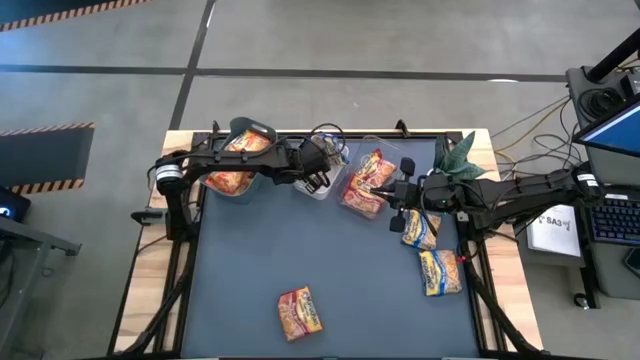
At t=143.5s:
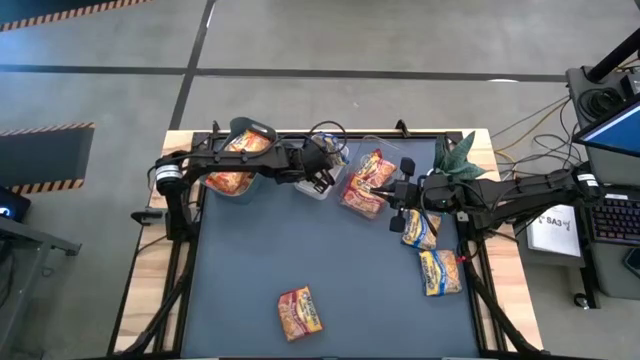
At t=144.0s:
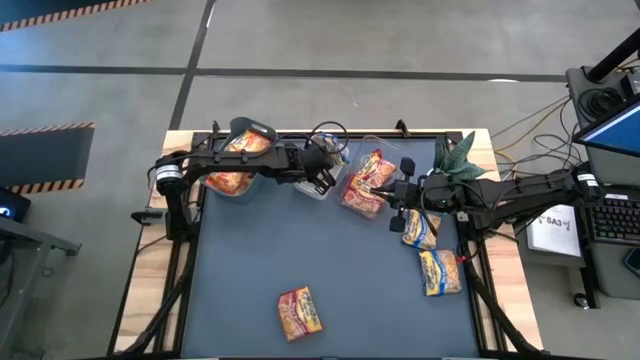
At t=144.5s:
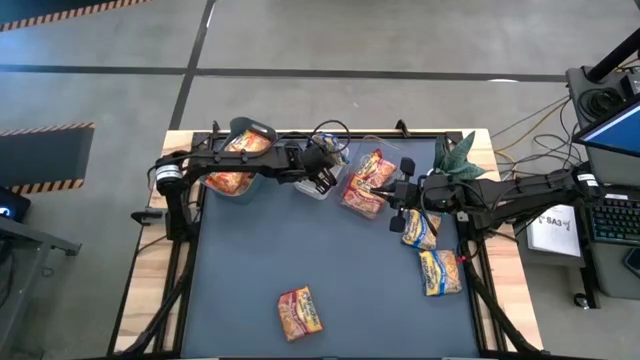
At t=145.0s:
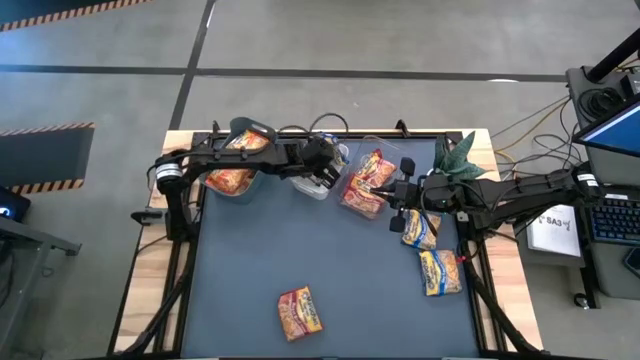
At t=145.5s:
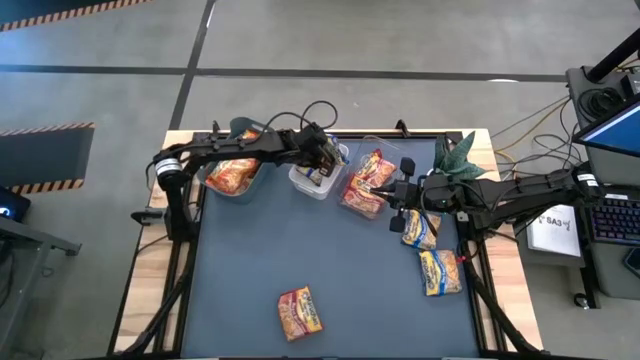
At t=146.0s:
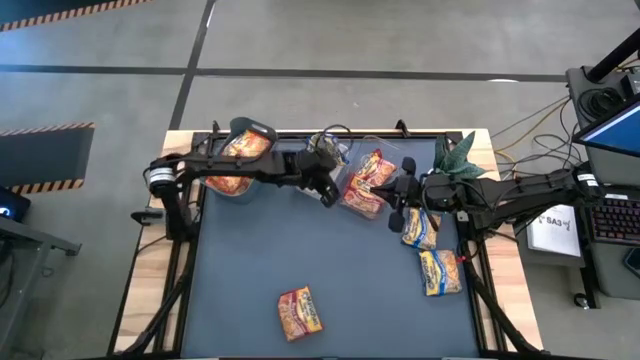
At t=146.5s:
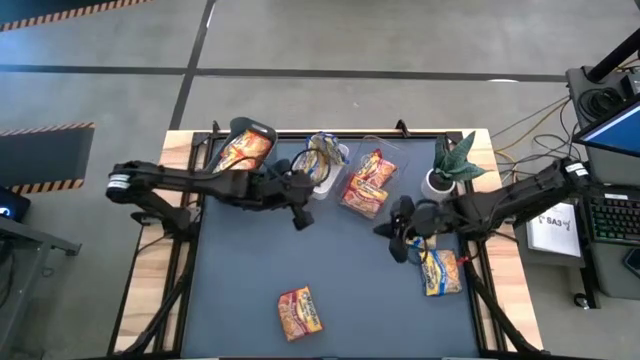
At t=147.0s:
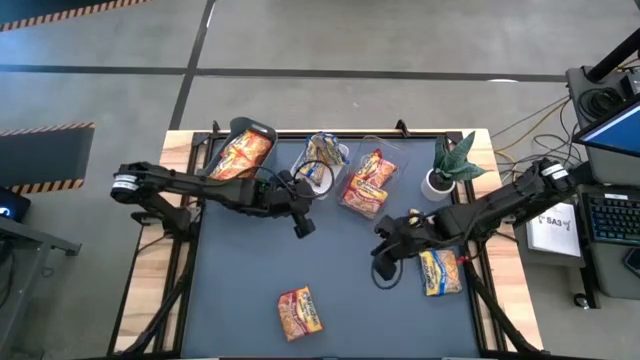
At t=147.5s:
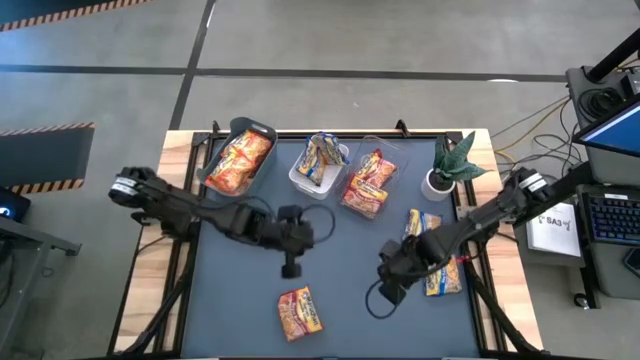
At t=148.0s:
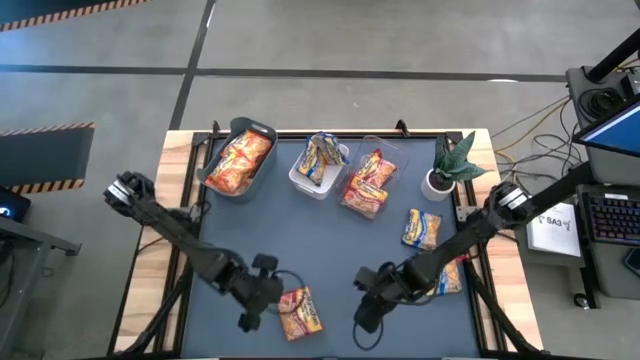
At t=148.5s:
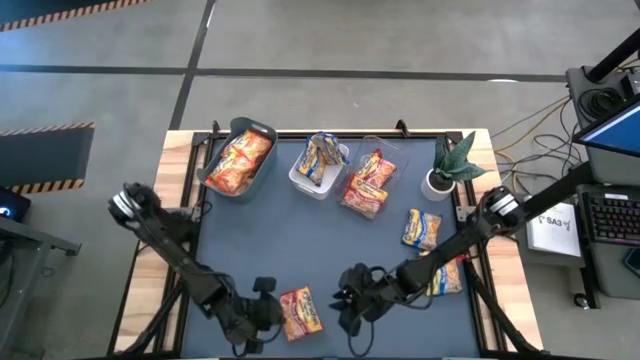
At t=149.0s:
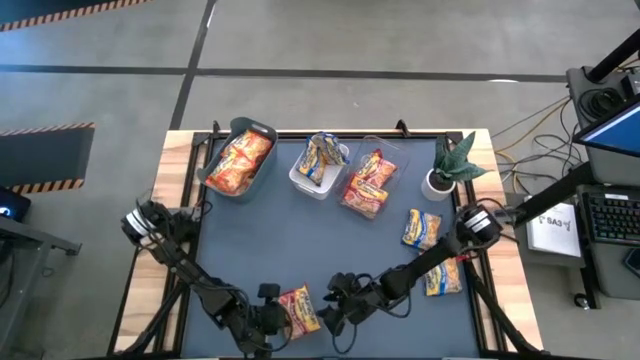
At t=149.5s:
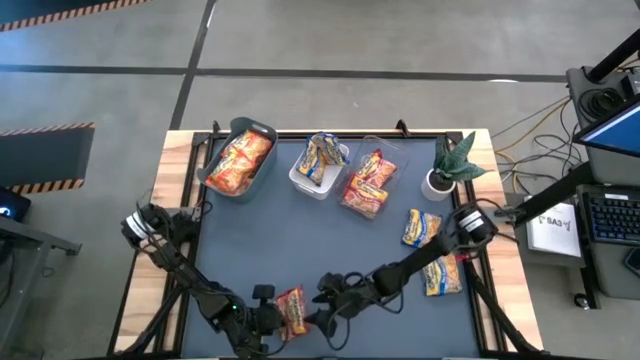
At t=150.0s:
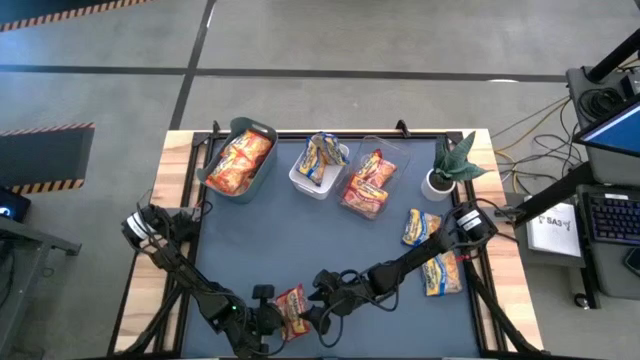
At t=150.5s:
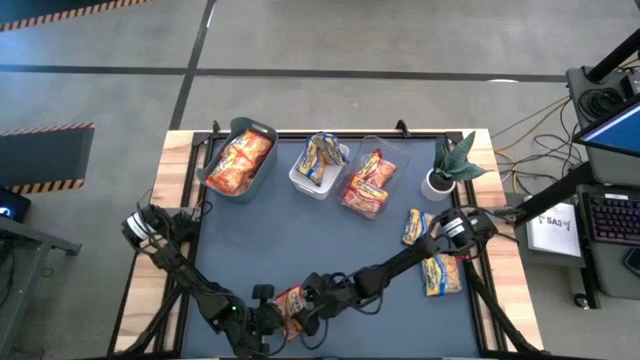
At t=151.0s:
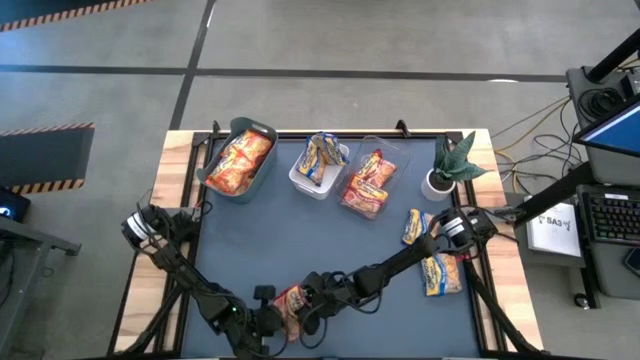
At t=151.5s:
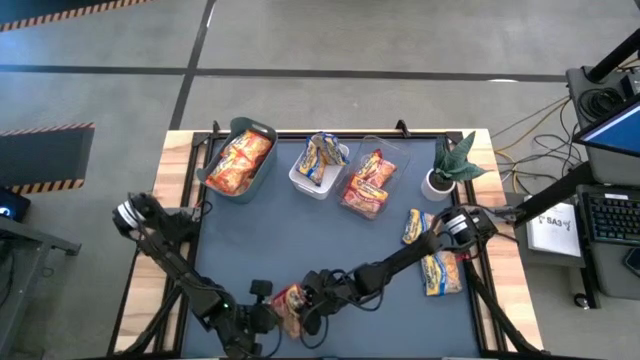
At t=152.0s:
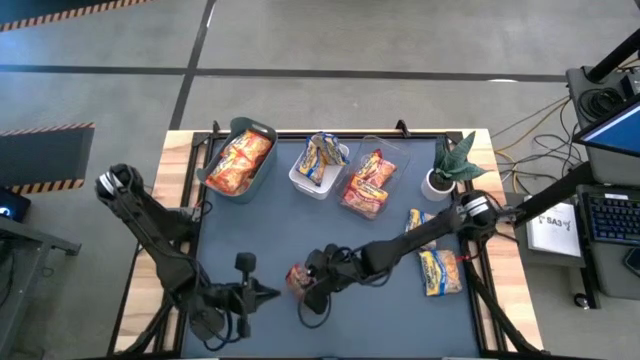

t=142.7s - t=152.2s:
Task: Sort Maruchan noodles
Put the red noodle pack into the transparent bin

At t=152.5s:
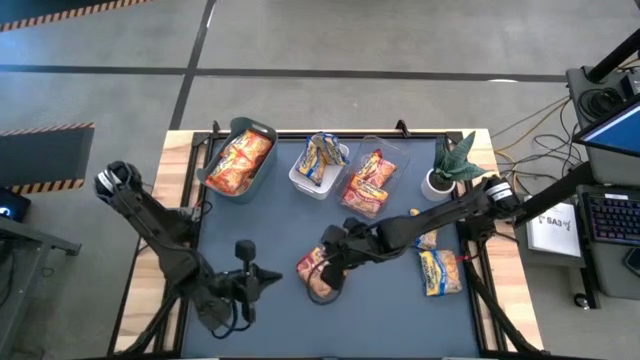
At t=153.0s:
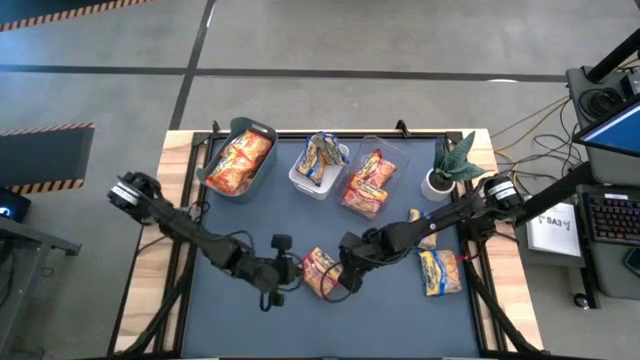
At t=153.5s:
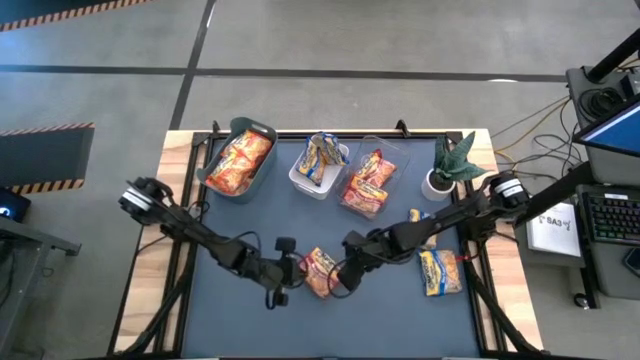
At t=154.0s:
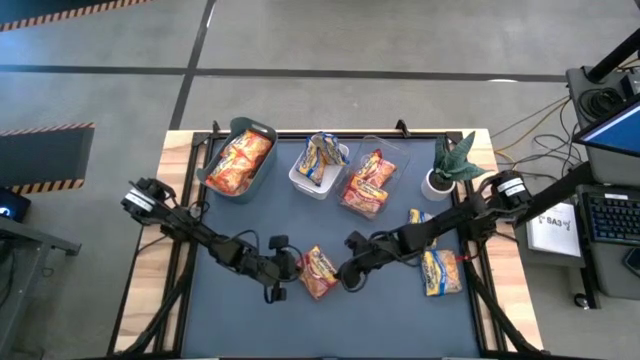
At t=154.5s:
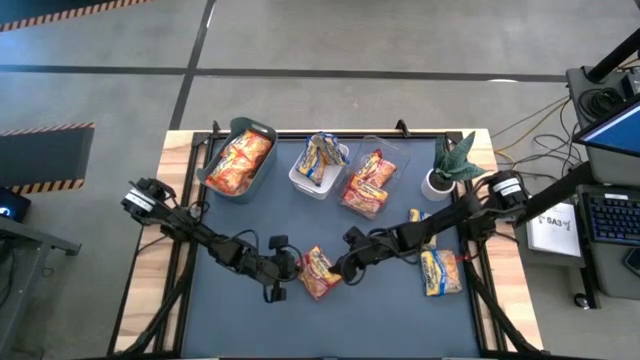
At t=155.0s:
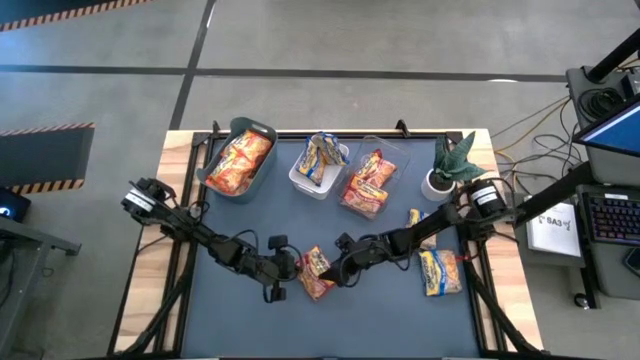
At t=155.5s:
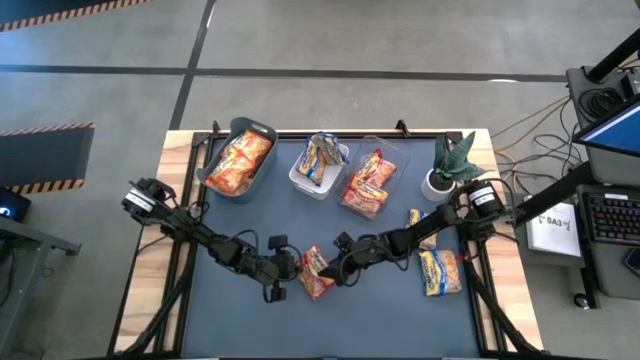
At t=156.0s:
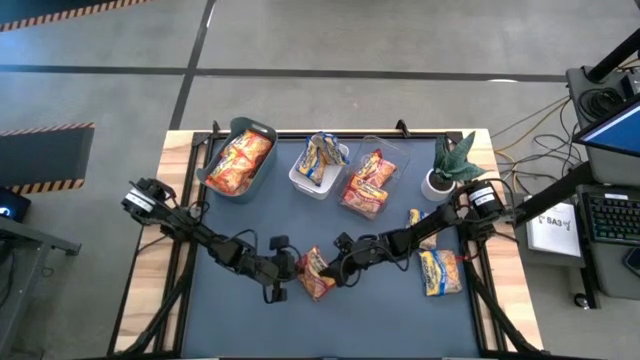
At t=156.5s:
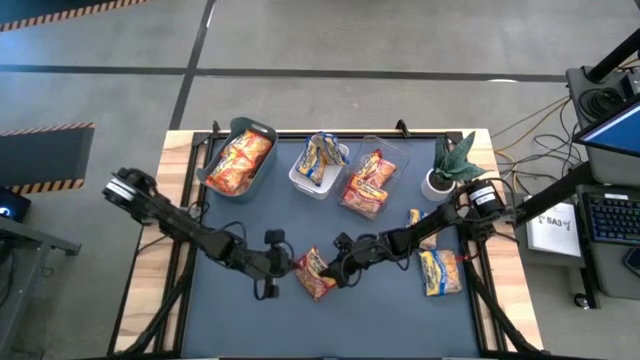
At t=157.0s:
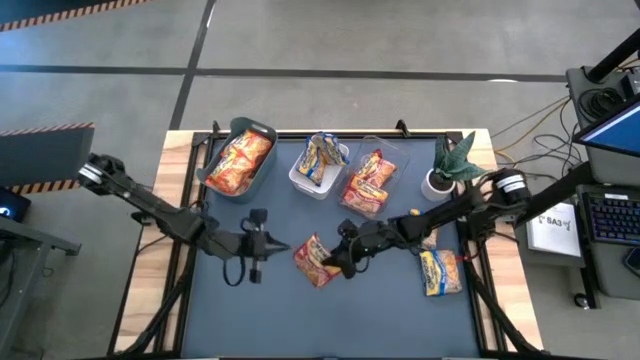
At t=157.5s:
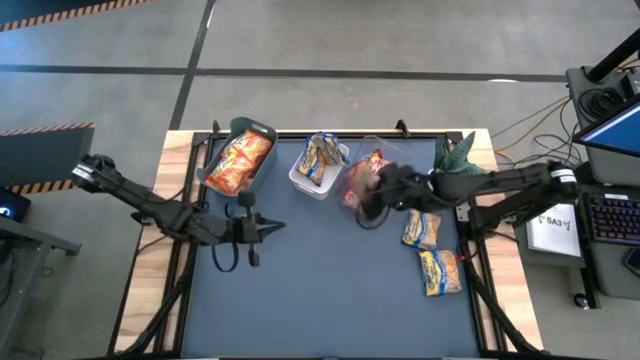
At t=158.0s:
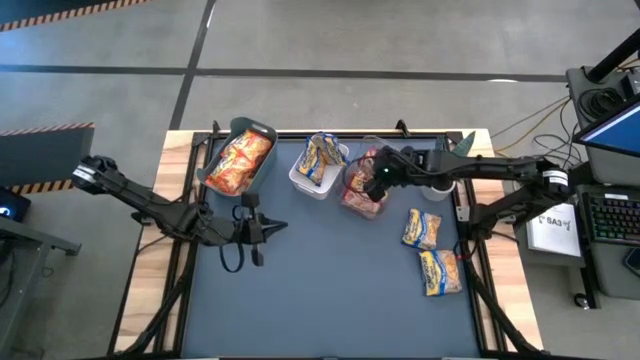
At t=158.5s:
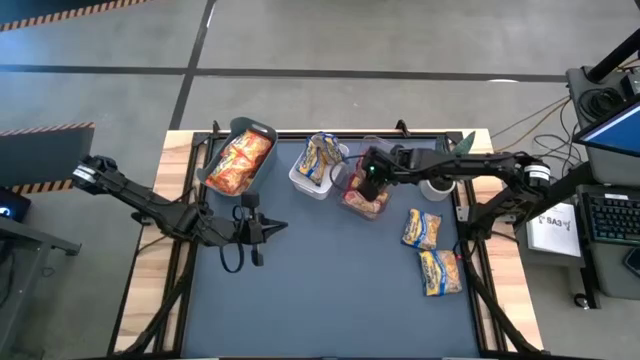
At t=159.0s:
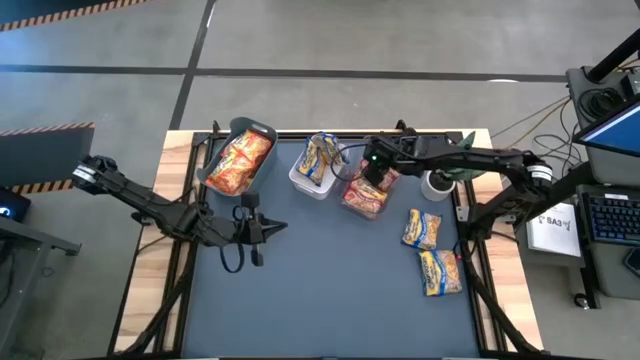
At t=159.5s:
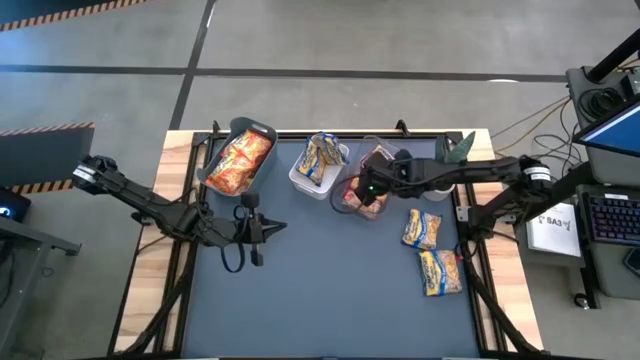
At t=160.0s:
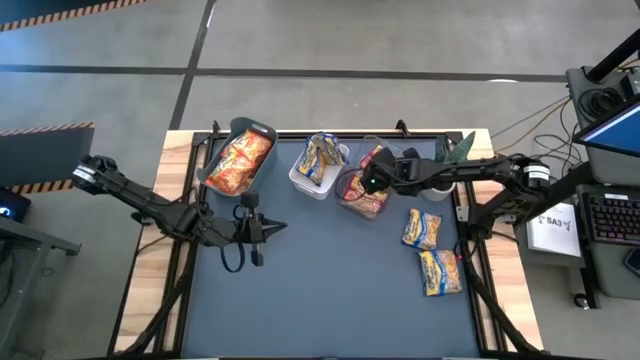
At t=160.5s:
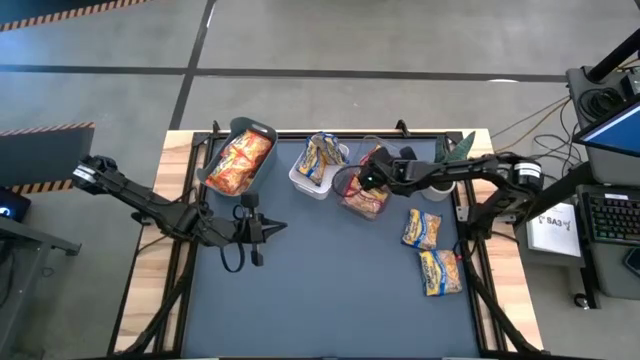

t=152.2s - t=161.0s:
Put the red noodle pack into the transparent bin

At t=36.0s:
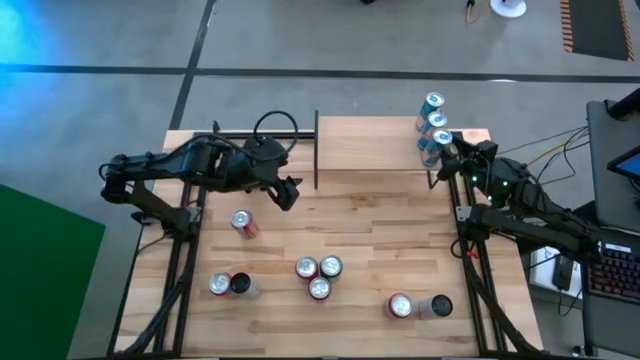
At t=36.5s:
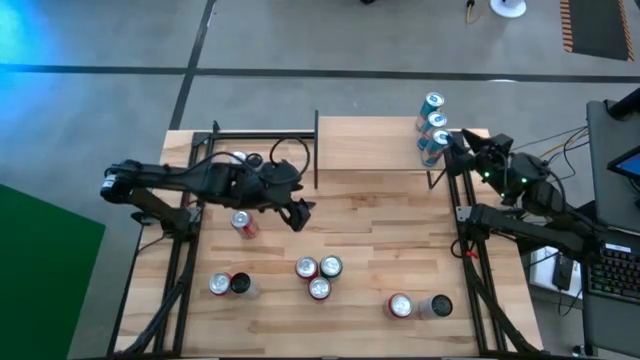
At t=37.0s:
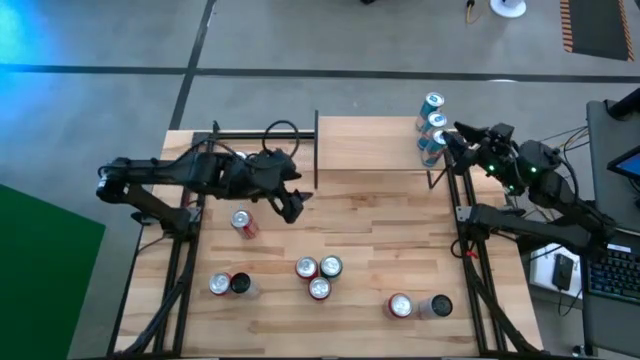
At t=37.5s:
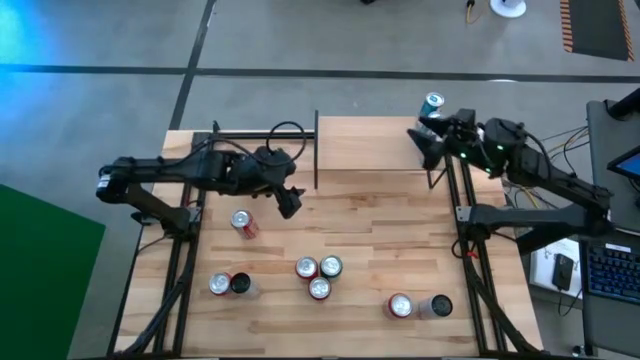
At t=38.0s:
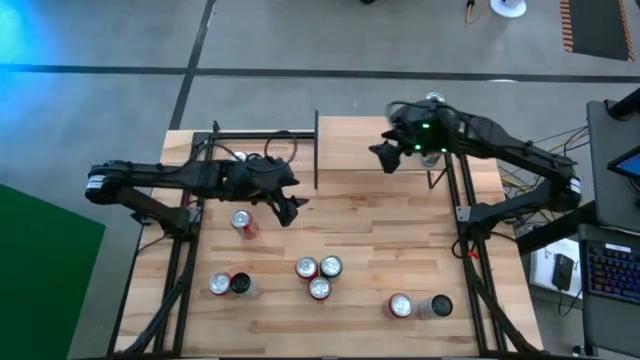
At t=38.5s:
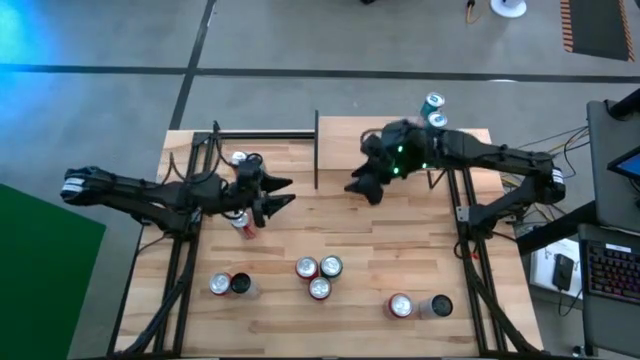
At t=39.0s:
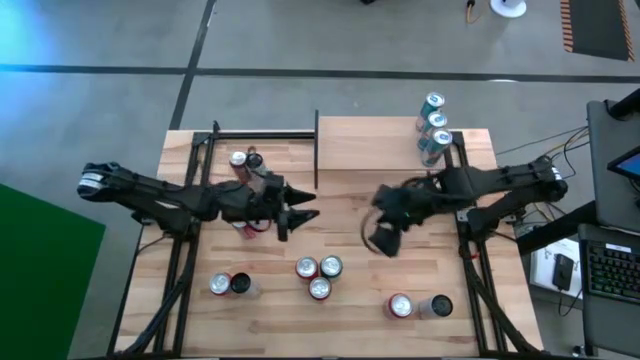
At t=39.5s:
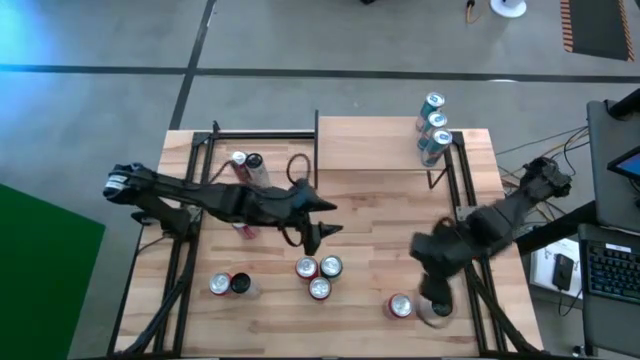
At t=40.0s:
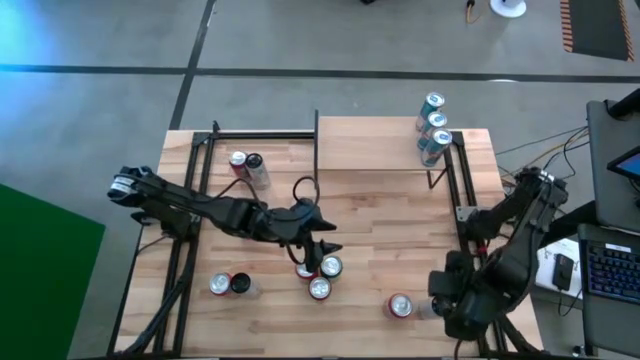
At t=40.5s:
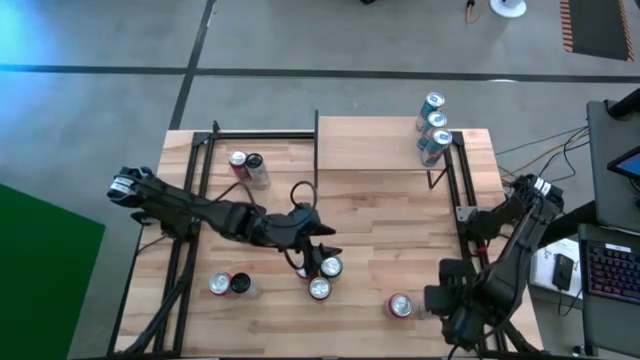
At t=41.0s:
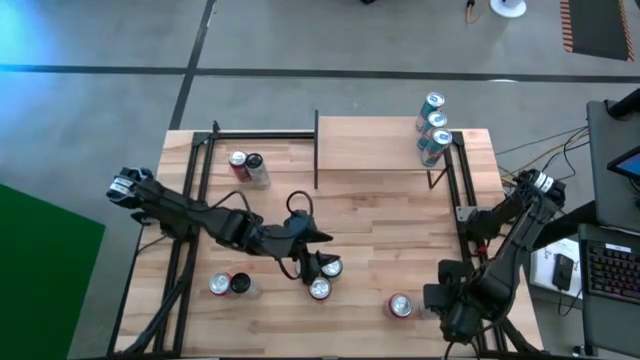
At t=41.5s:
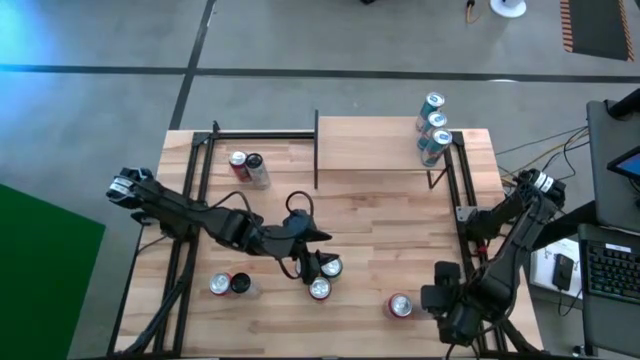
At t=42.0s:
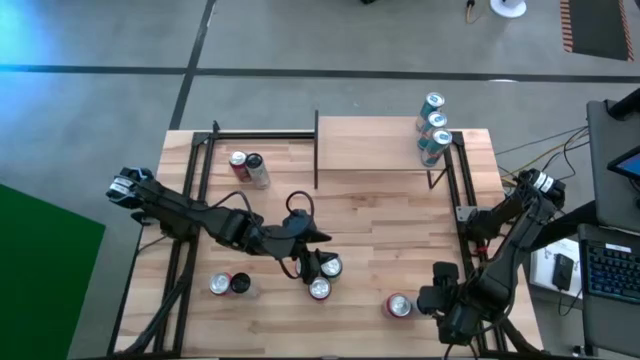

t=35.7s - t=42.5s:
Task: Place canned beverage on shelf
Put the bottom white-pink soda can on the shelf
